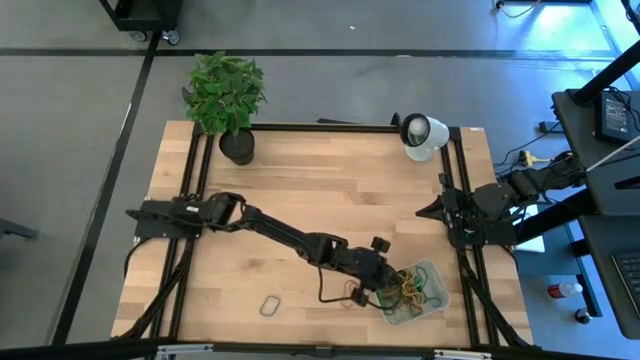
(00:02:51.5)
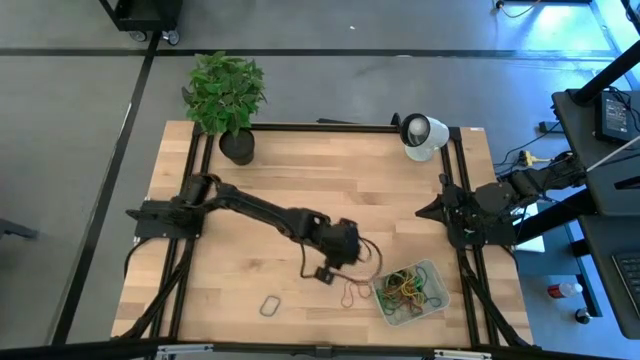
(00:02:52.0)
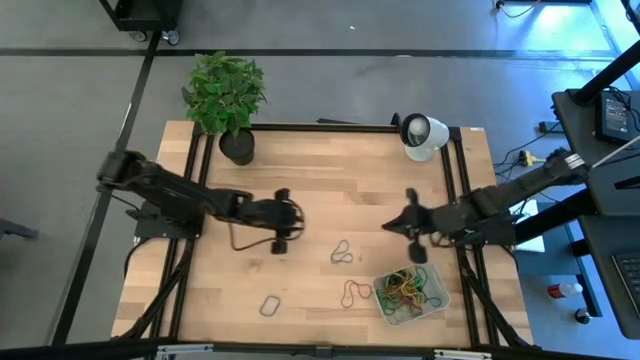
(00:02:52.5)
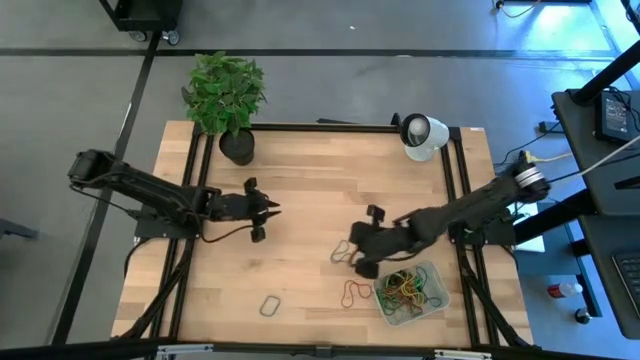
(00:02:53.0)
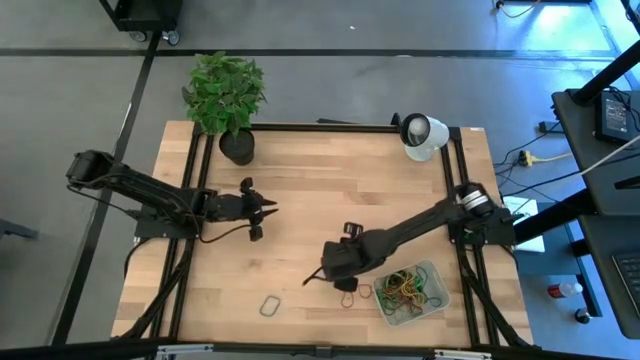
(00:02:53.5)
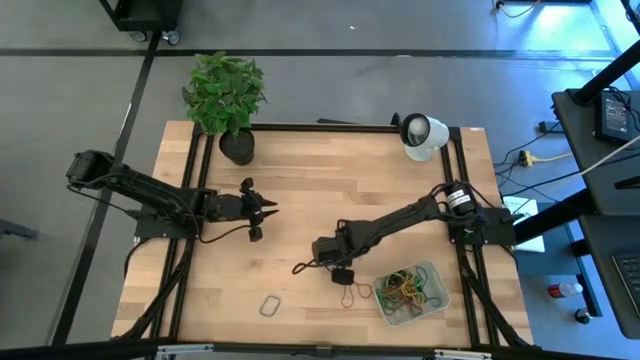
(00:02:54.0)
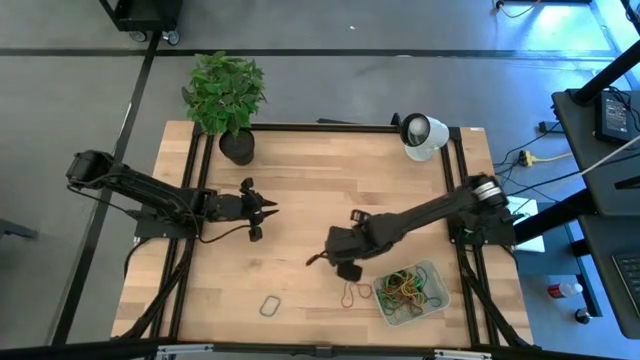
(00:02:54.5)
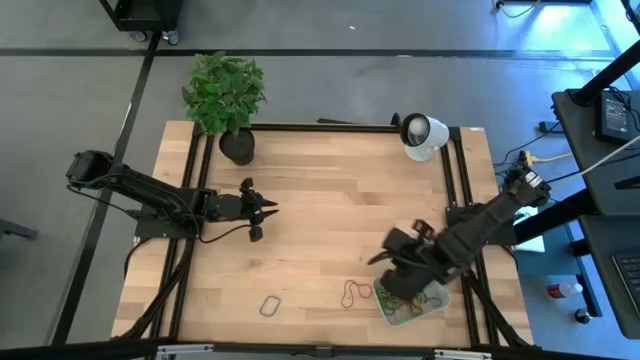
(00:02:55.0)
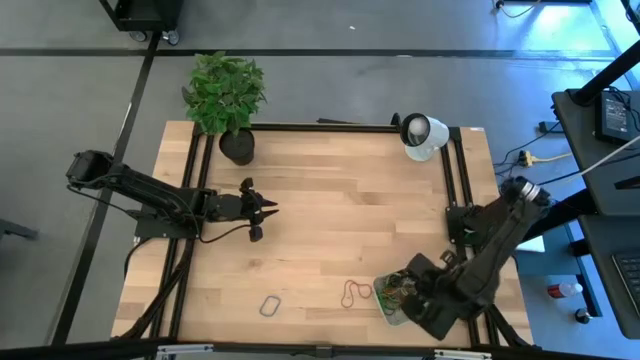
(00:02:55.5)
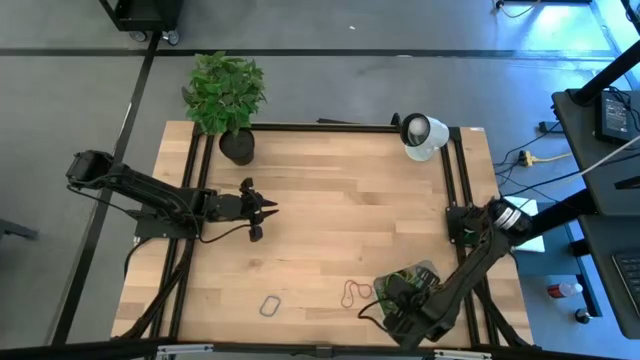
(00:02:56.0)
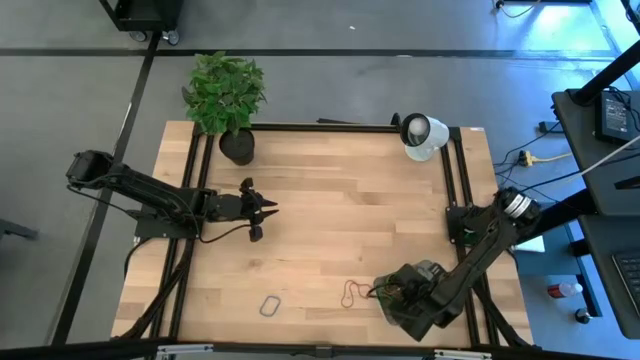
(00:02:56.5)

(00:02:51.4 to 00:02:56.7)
Task: Pick and place rubber bands into bin
Put the blue rubber band into the white bin

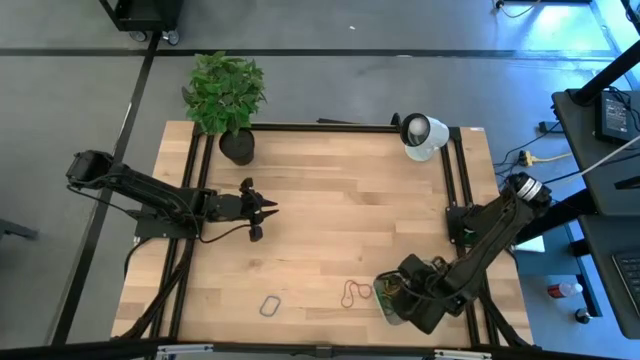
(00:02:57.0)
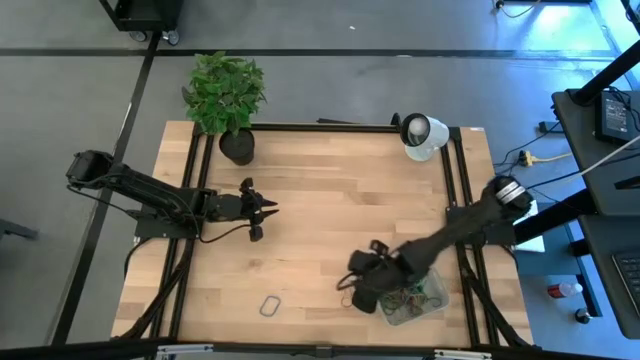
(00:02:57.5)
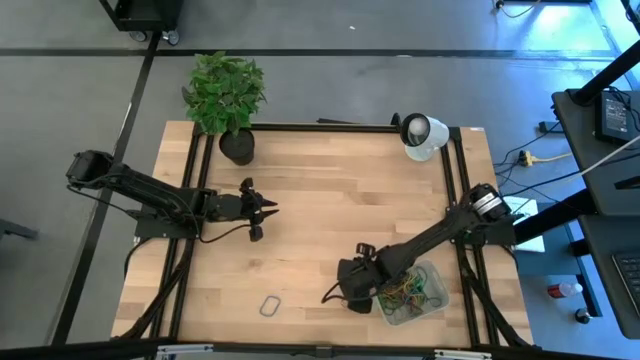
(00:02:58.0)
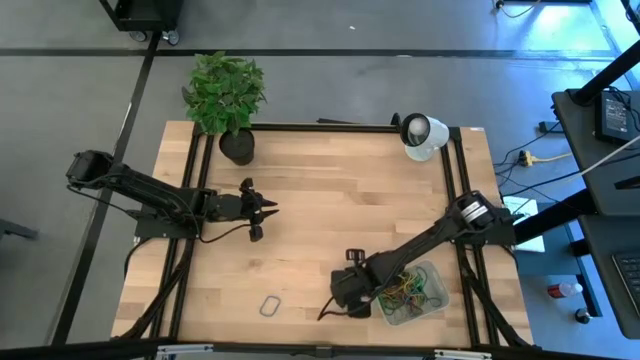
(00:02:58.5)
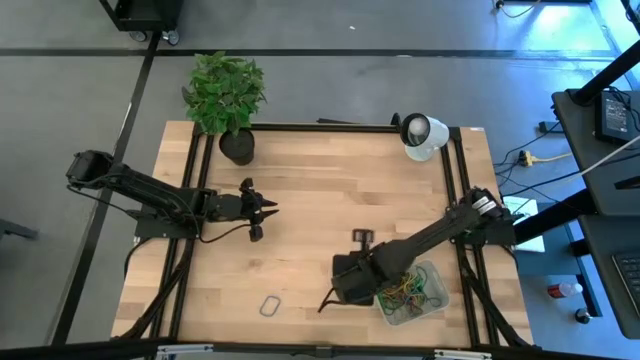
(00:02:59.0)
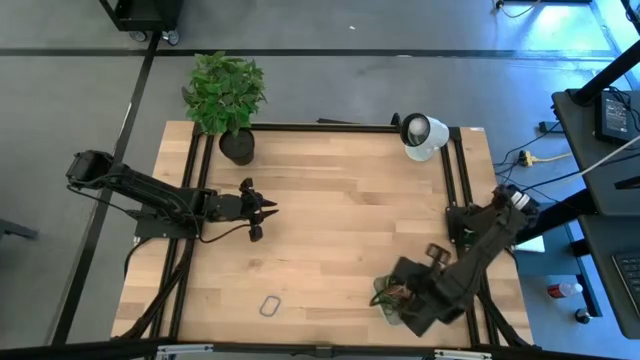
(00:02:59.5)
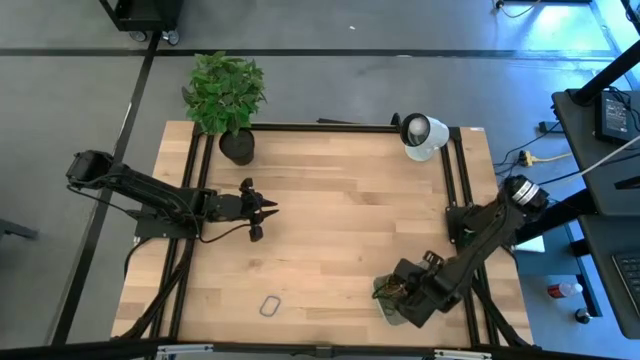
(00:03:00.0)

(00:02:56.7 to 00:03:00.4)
Put the red rubber band into the white bin

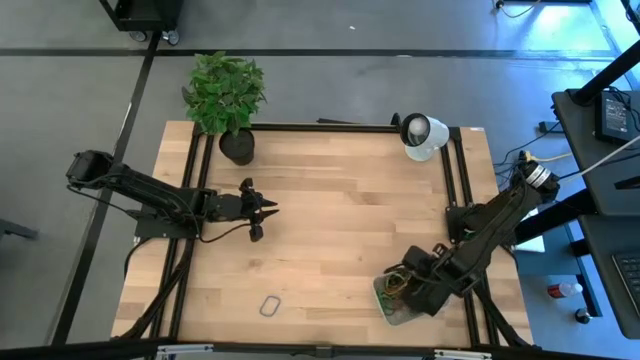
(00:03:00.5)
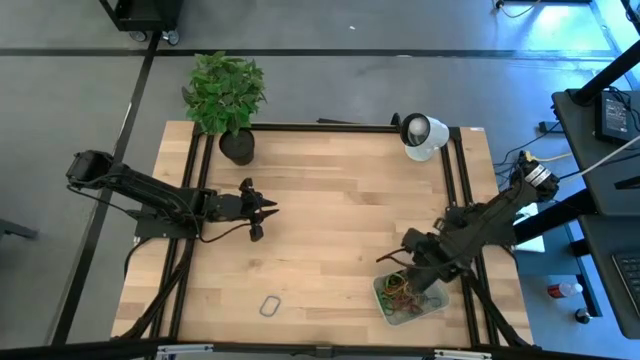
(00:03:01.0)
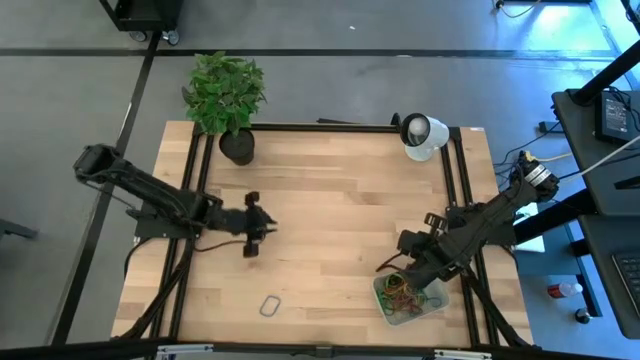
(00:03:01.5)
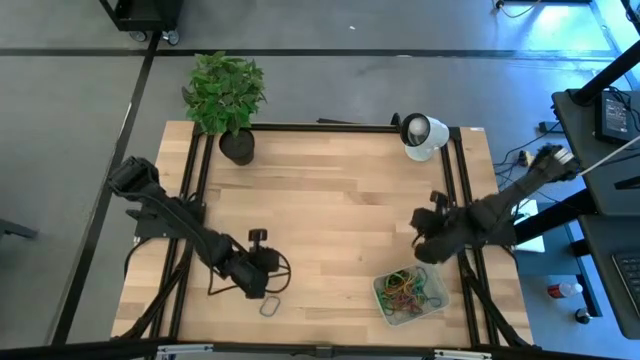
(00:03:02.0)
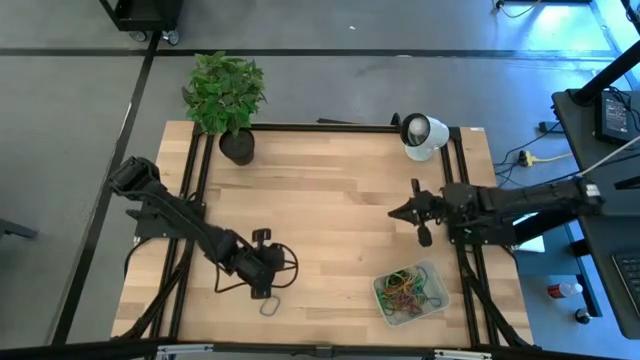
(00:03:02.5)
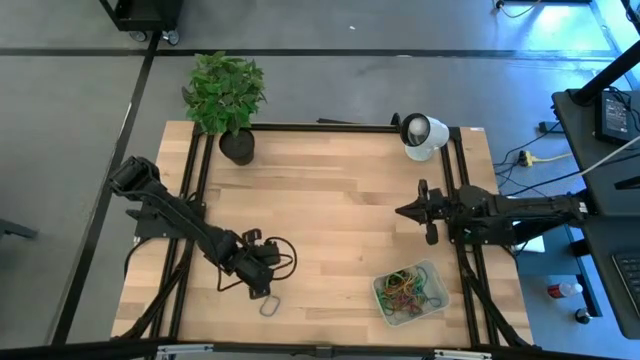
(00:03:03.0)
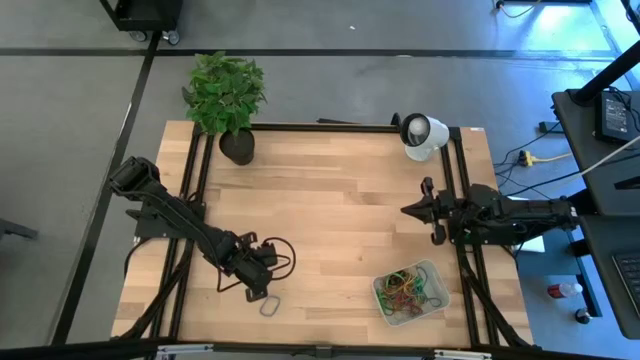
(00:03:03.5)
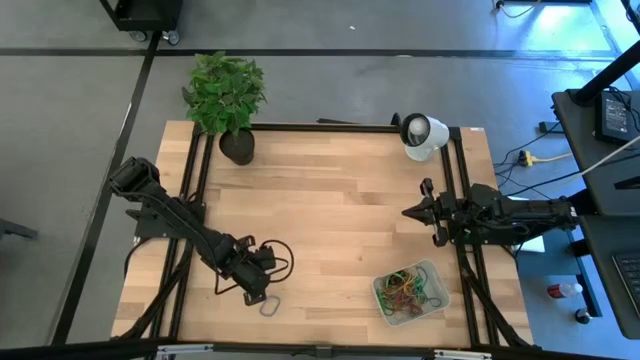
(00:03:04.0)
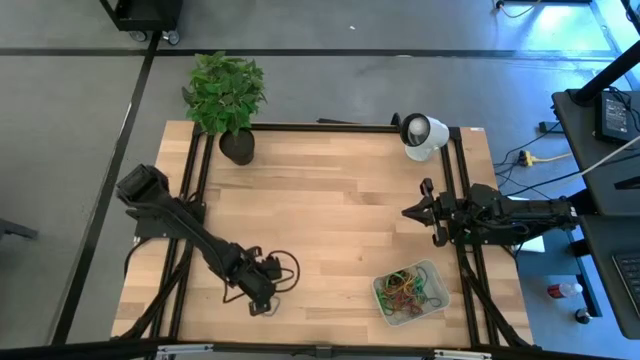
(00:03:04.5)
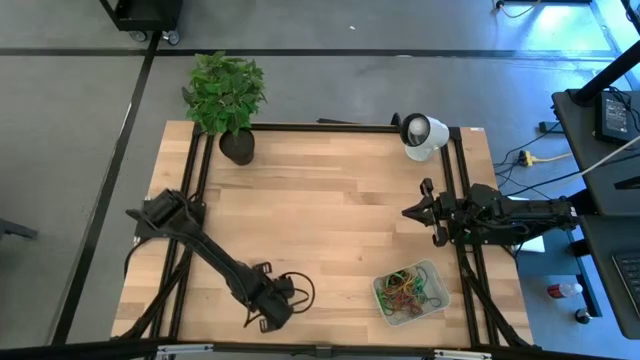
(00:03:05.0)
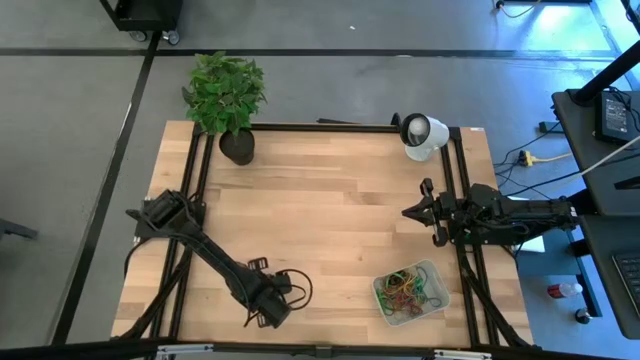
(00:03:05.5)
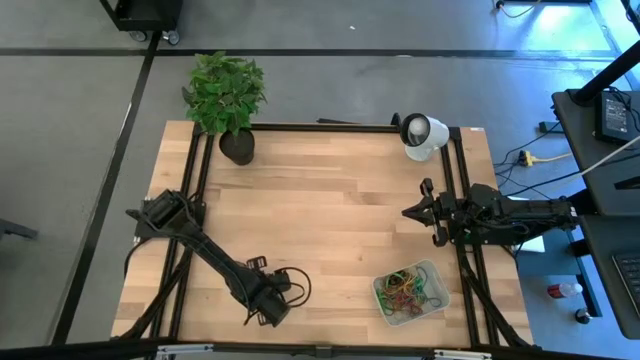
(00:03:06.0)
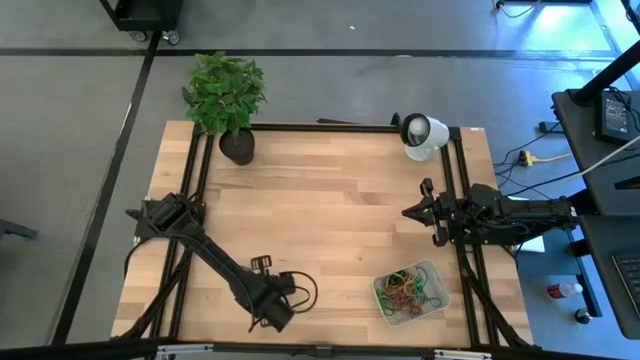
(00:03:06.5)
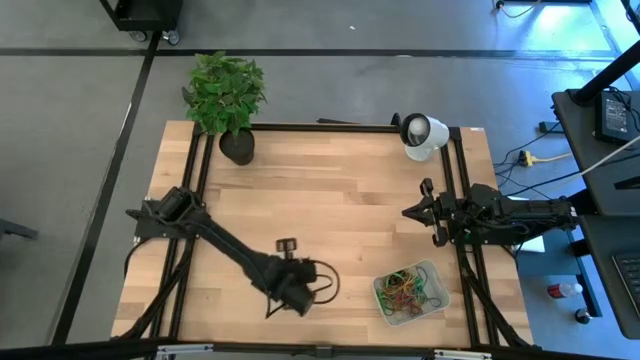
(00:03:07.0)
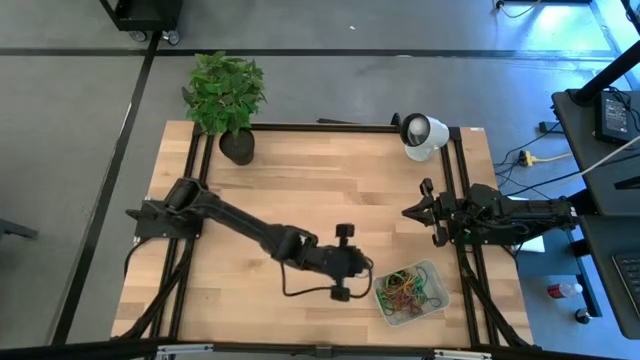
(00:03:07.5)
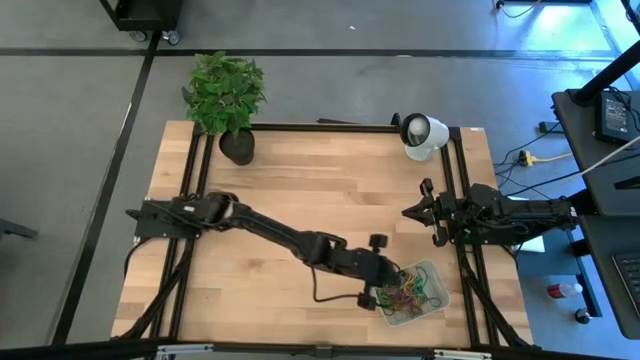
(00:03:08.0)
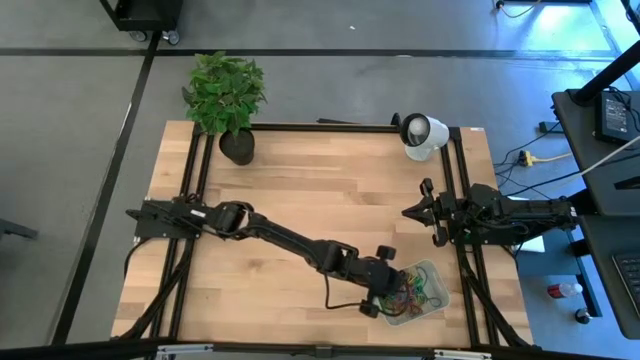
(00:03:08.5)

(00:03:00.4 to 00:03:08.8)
Put the blue rubber band into the white bin

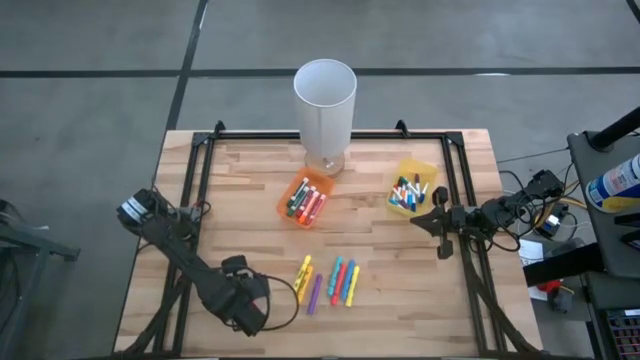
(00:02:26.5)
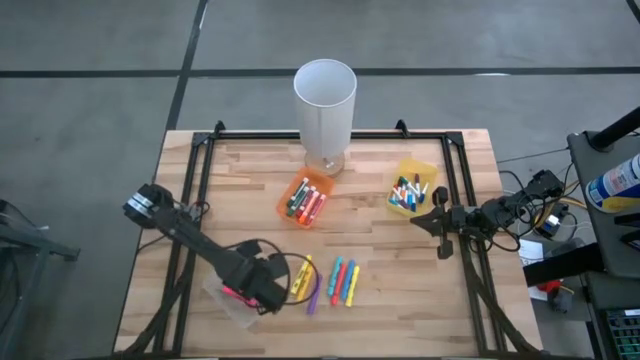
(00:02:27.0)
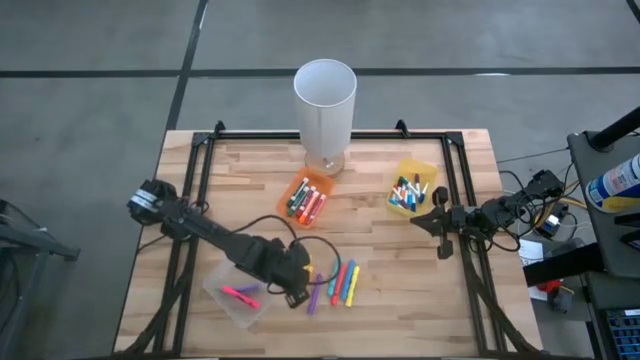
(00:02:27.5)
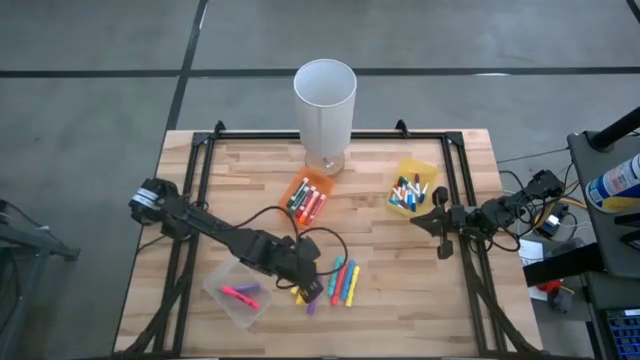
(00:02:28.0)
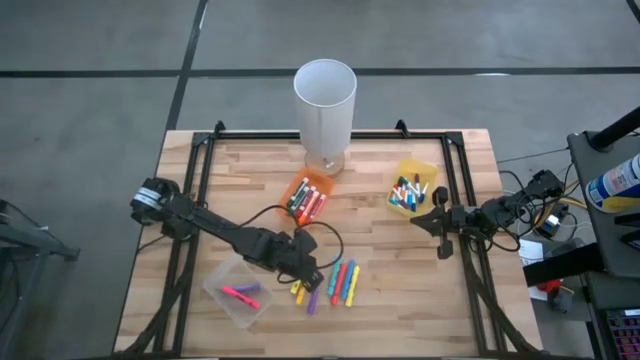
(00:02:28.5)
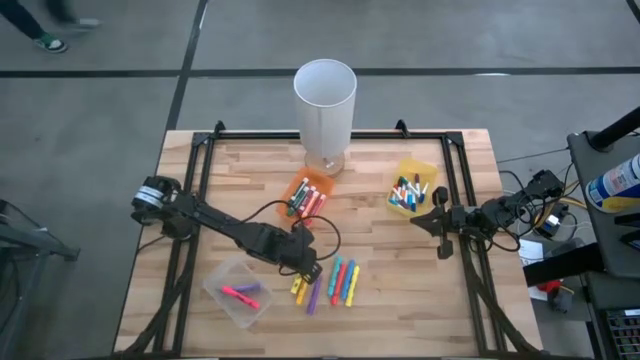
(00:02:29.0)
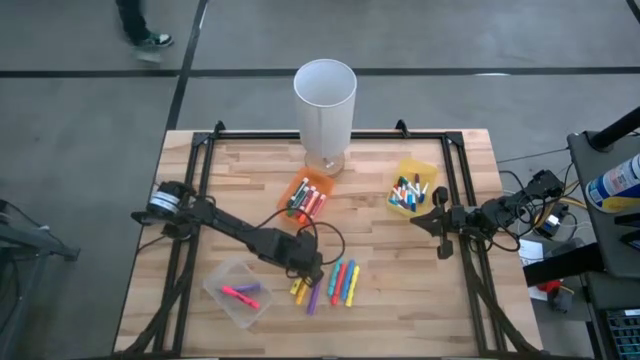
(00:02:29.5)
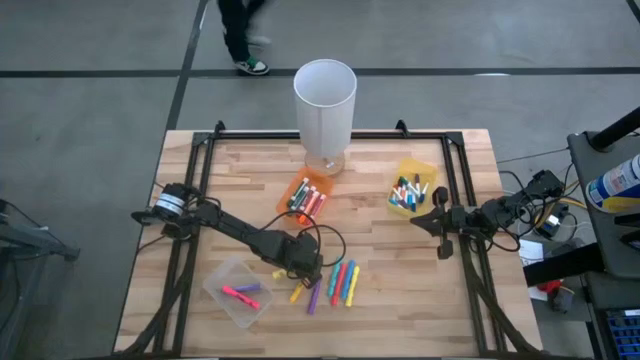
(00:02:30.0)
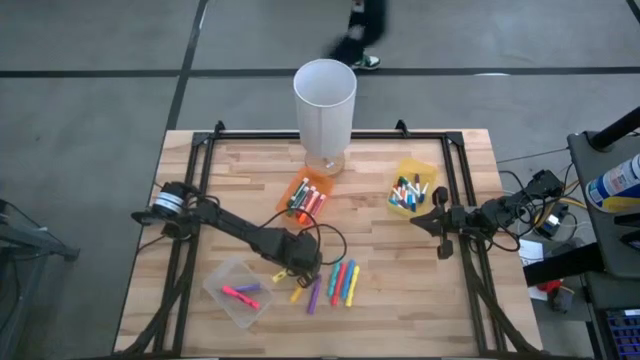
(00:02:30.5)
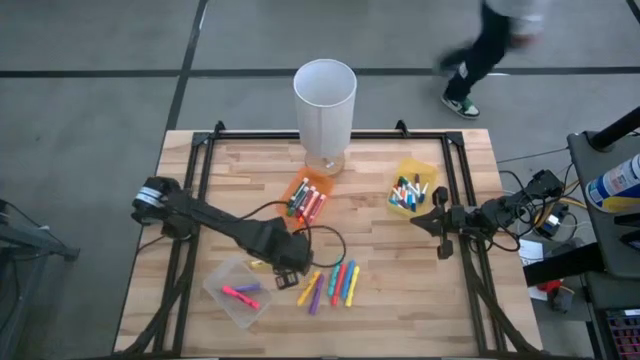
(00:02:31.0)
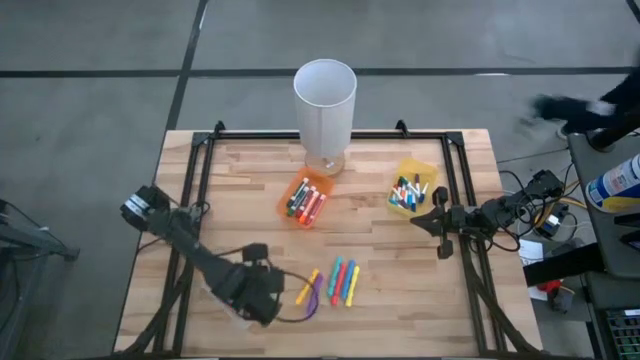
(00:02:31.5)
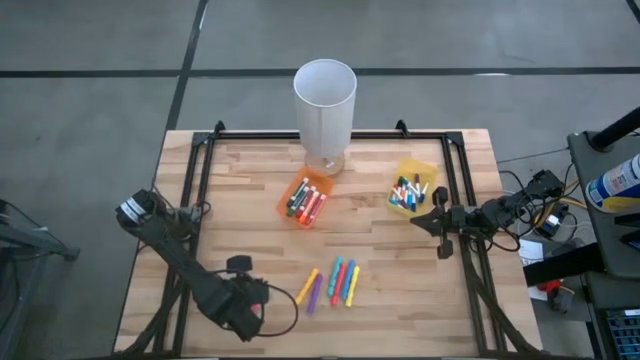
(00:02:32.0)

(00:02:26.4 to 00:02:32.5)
Task: Pick & Place Markers
Put the left light yellow highlighter pen into the white bin
